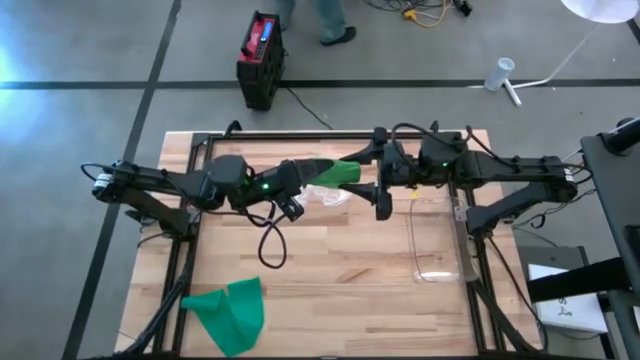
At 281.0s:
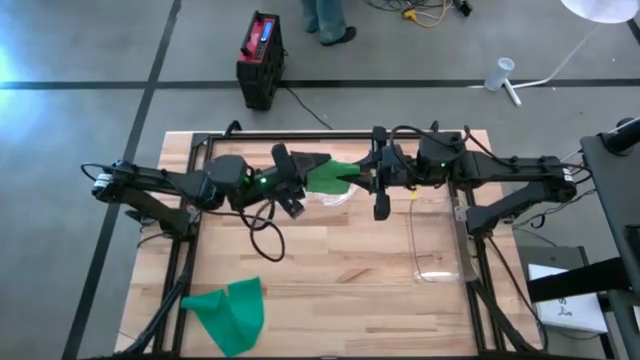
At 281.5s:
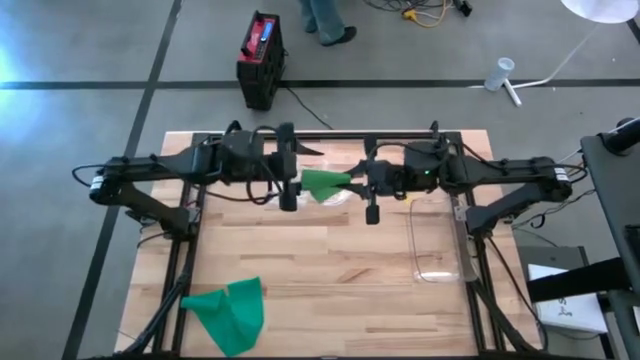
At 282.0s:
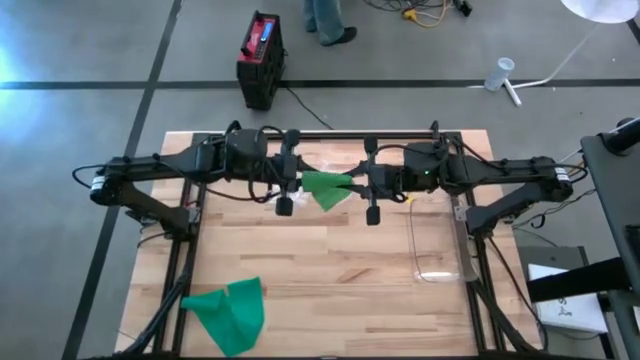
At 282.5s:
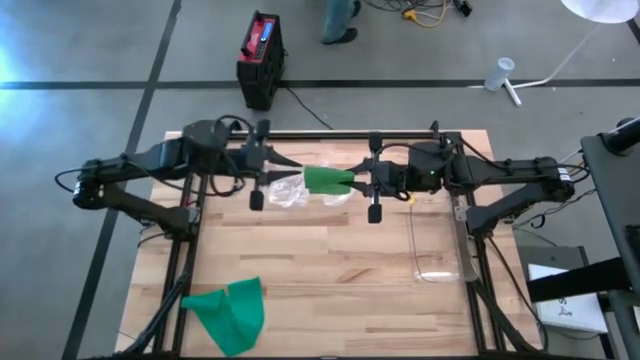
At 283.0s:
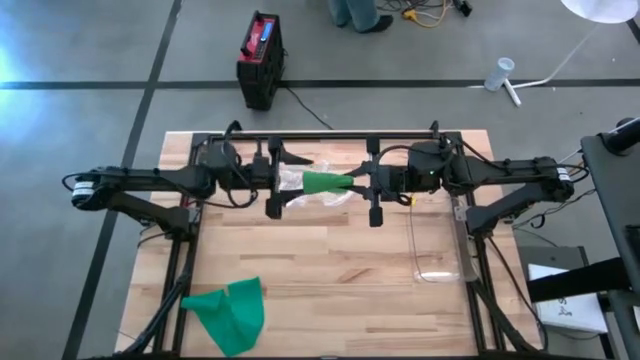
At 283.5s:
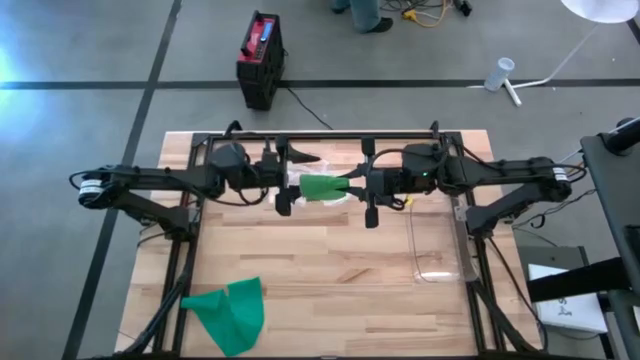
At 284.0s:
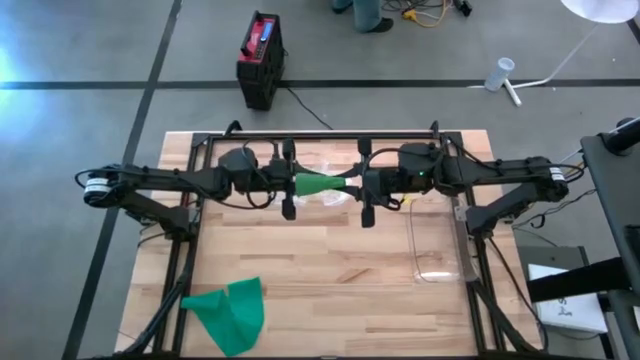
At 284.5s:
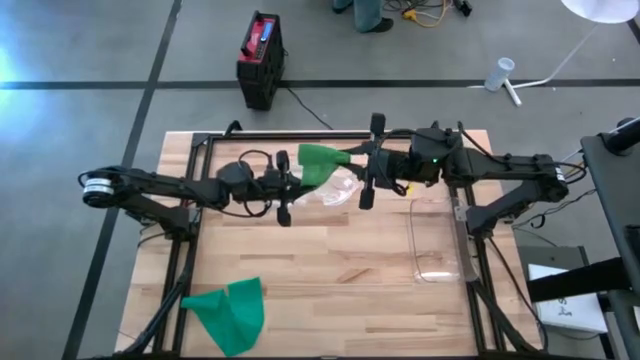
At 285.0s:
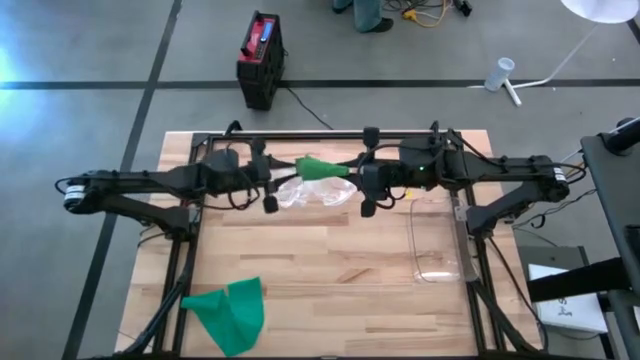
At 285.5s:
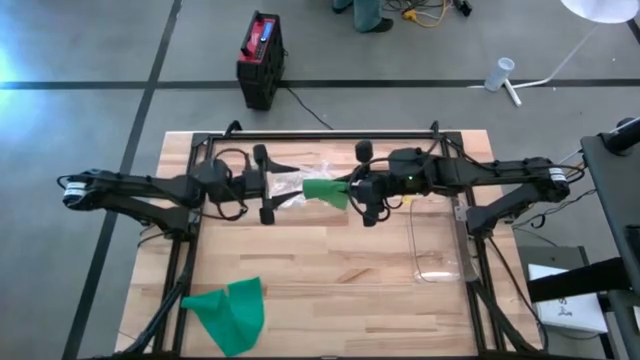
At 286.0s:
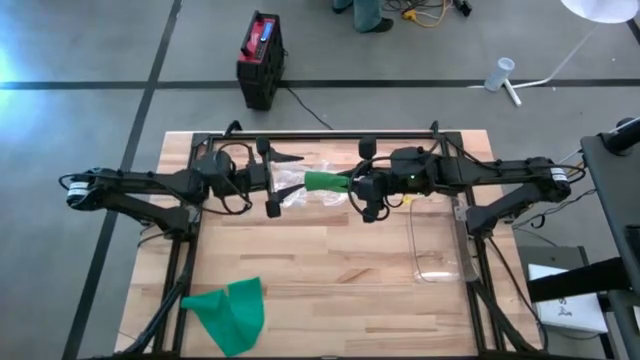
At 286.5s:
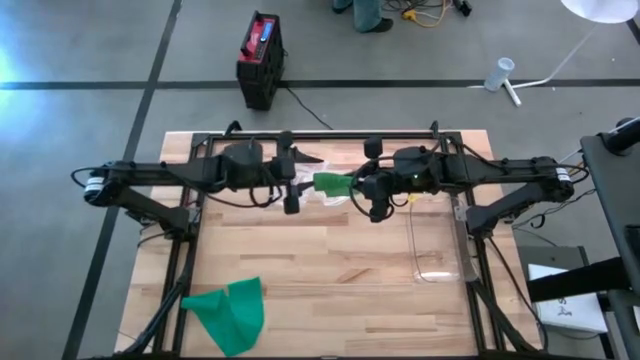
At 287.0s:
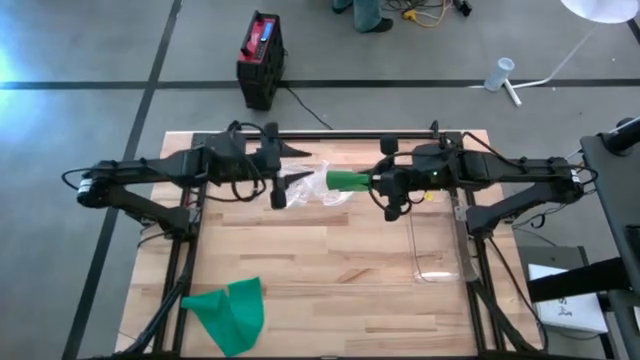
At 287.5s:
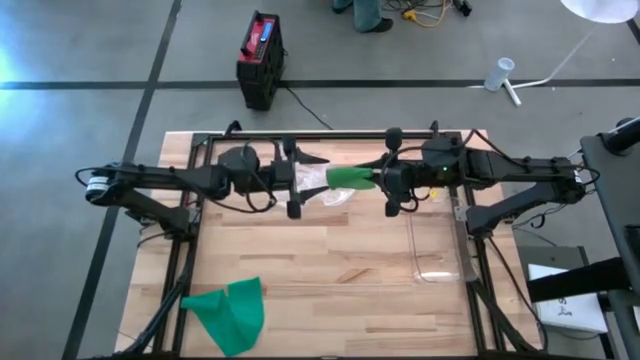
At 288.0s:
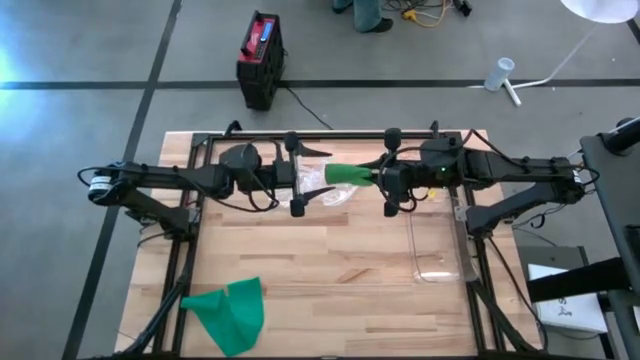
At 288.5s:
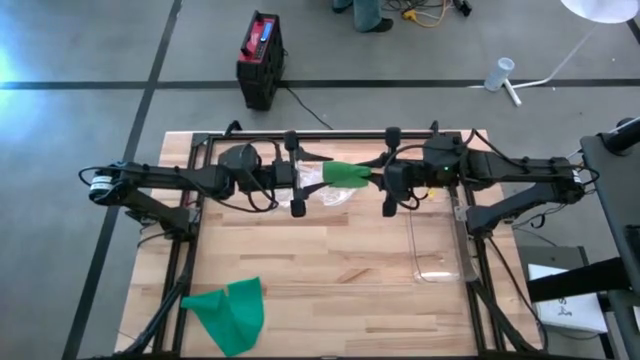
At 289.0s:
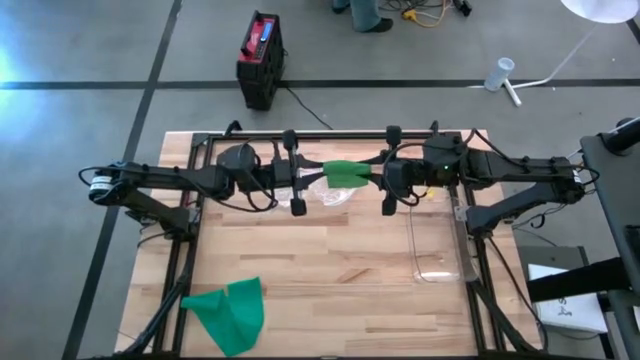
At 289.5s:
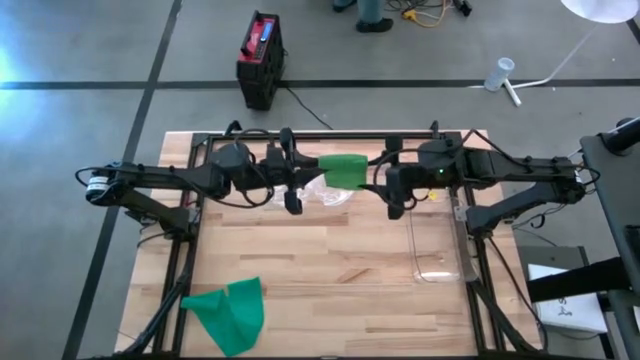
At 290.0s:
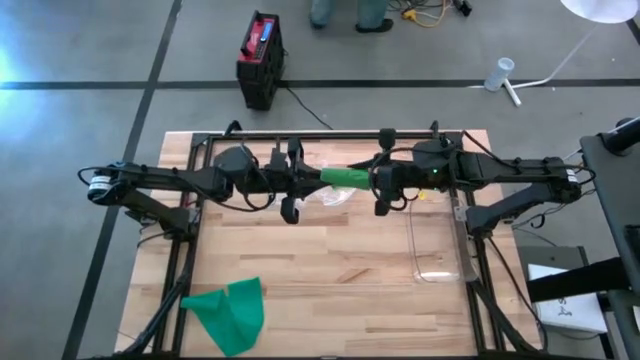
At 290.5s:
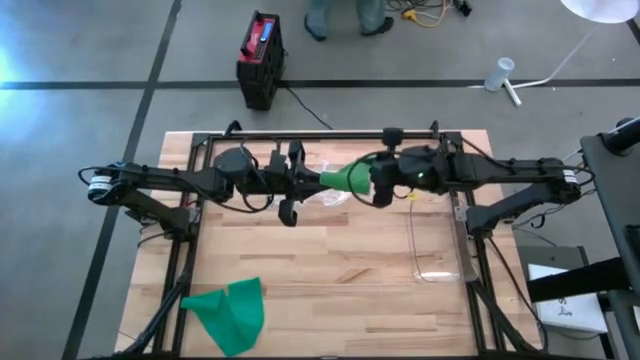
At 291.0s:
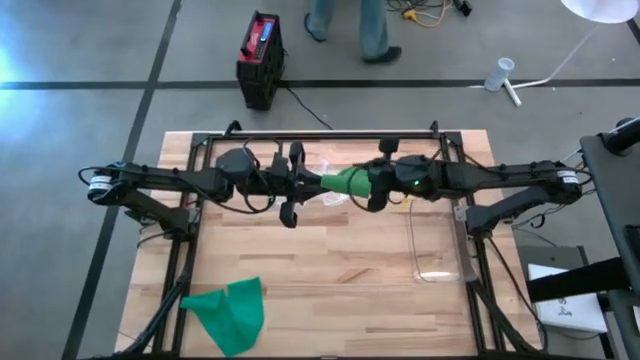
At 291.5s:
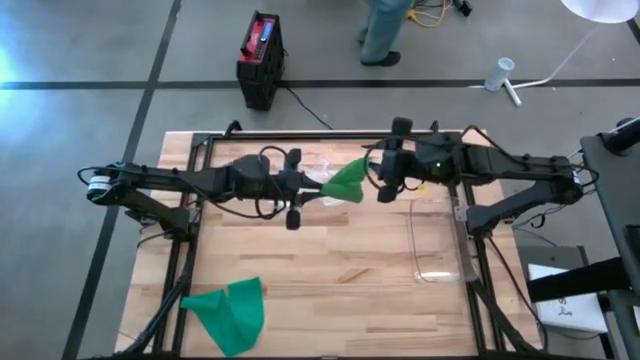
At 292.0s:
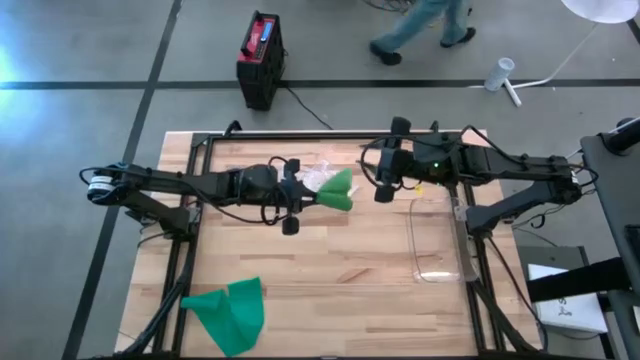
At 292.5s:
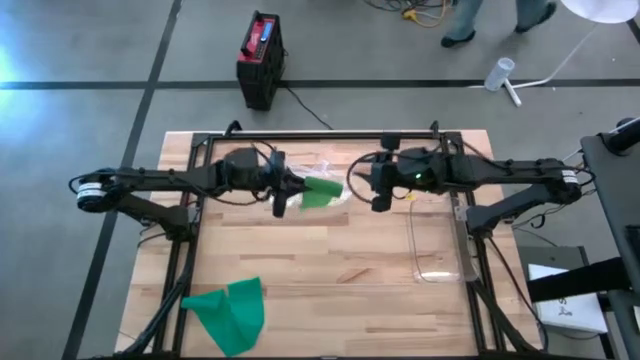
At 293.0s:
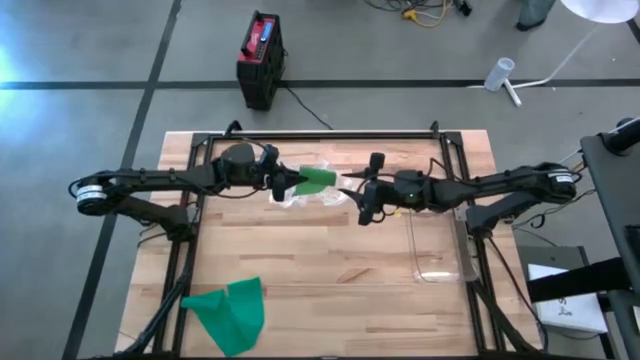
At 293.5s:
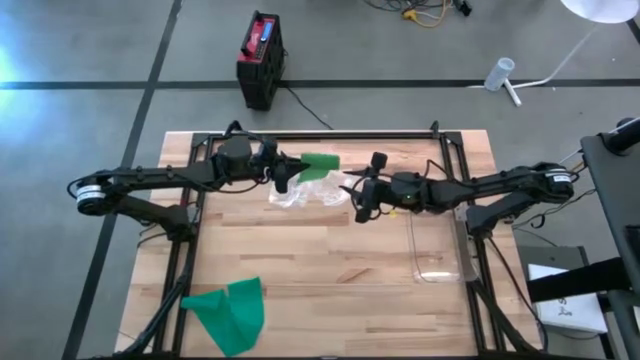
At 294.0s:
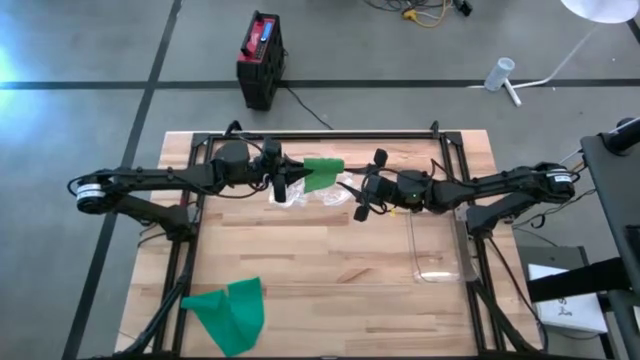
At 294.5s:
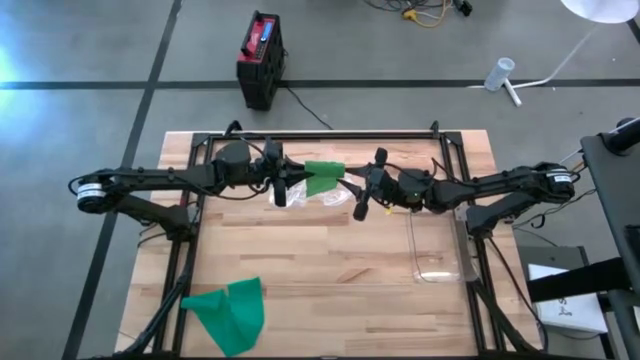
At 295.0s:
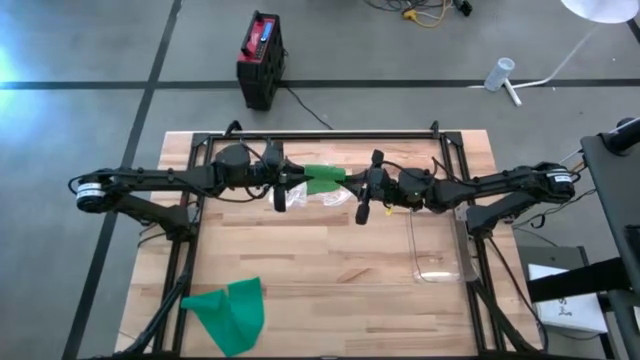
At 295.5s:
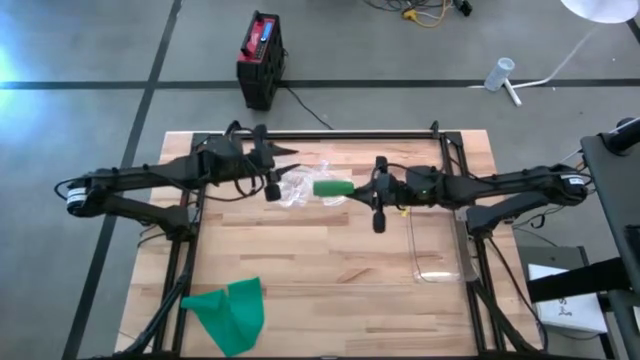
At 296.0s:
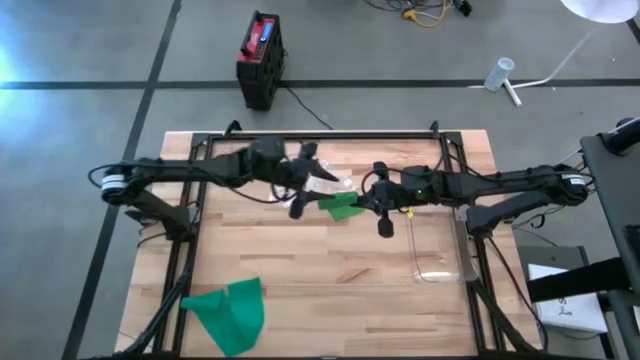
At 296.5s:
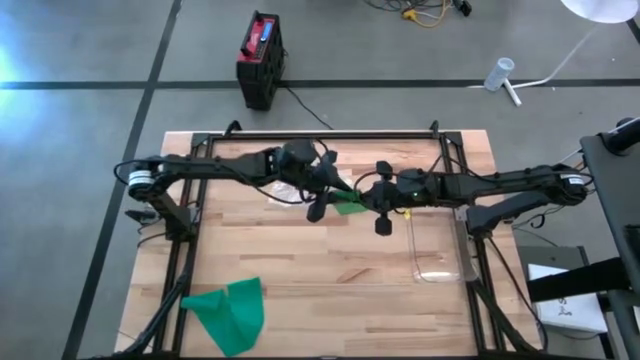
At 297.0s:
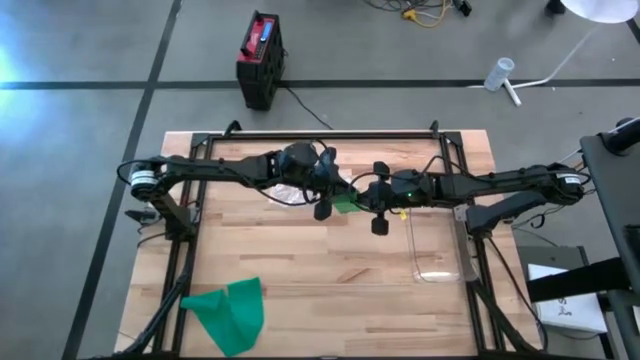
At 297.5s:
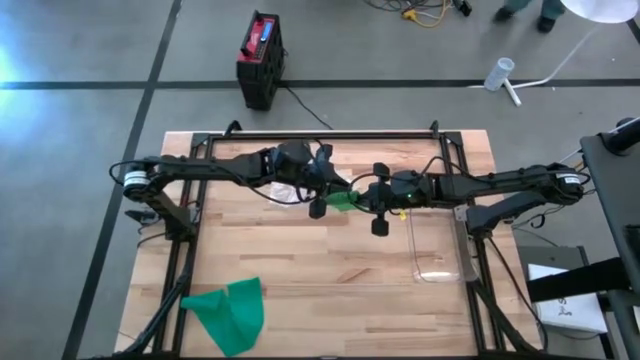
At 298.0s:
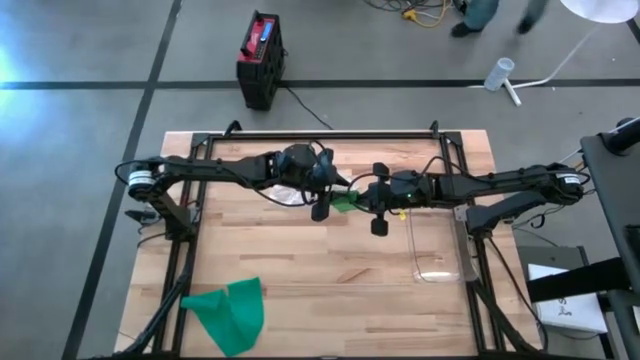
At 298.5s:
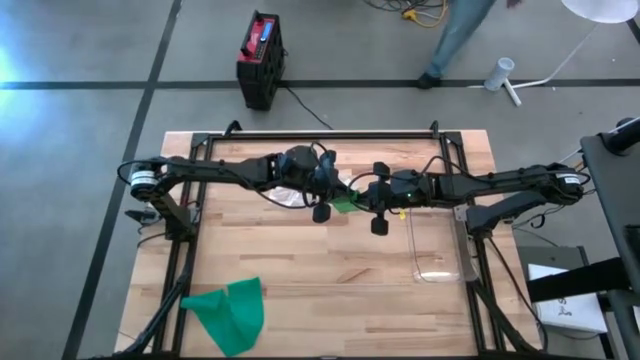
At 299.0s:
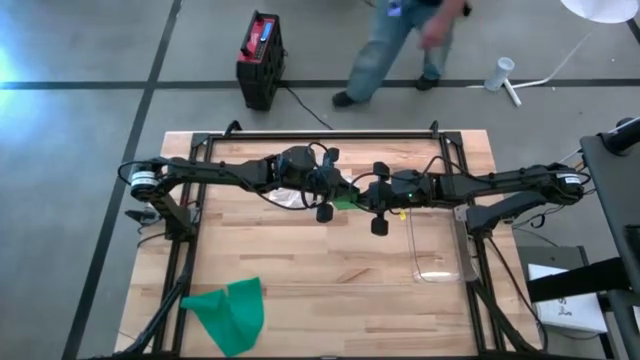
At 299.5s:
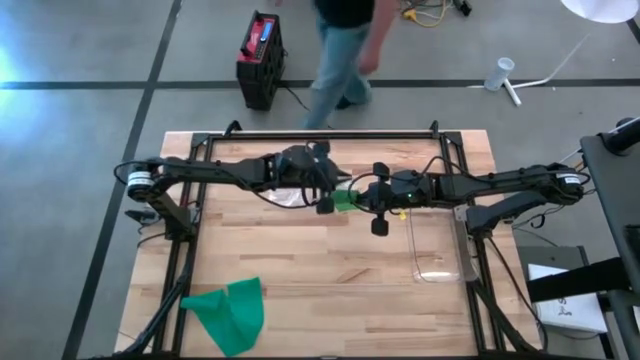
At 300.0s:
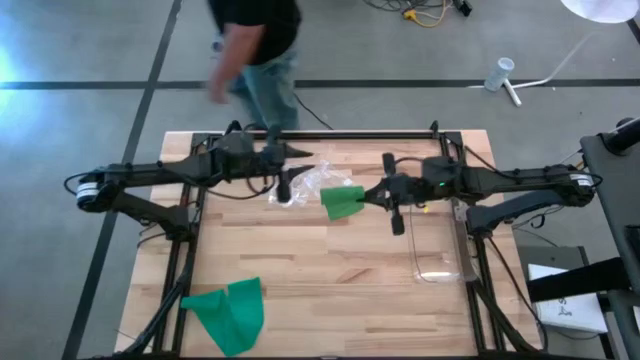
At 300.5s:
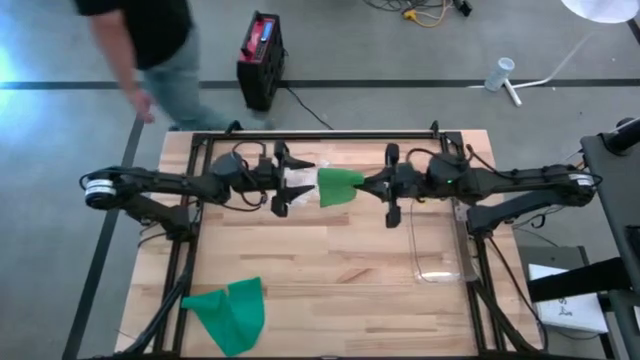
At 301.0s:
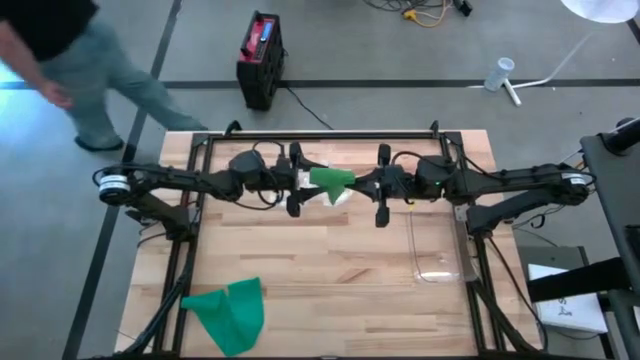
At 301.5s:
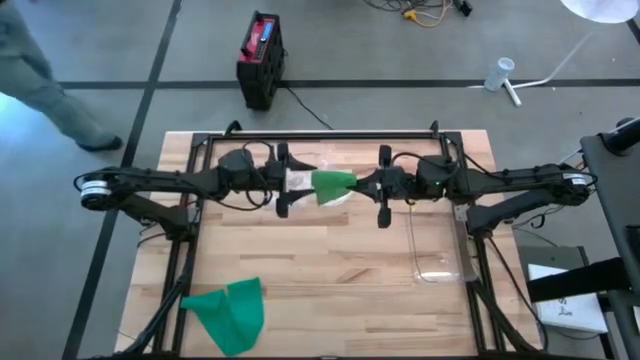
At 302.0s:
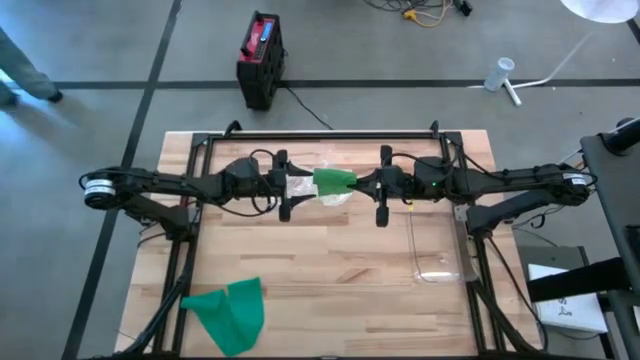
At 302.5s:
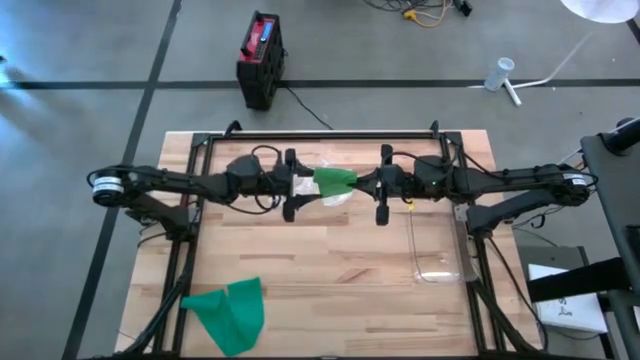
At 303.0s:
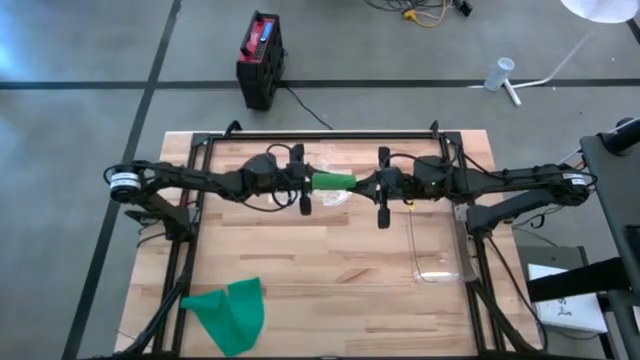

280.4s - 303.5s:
Task: Roll bandage
Roll the green bandage
